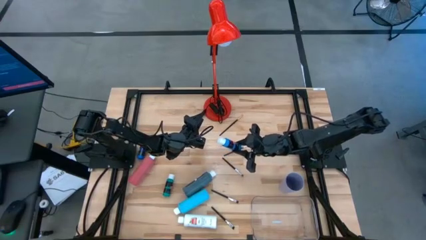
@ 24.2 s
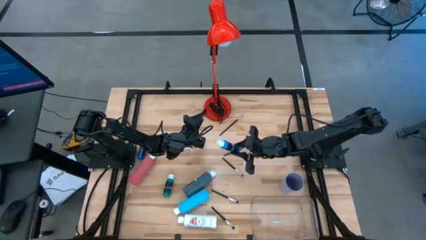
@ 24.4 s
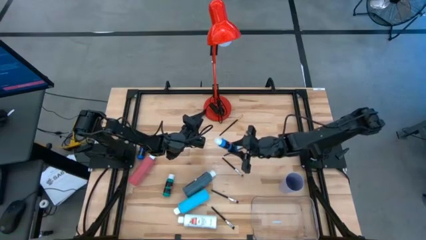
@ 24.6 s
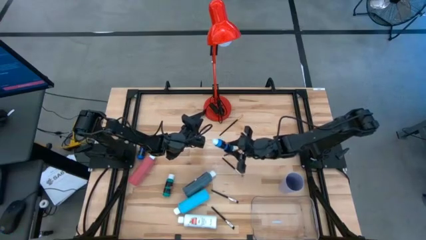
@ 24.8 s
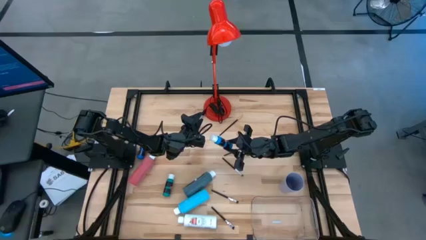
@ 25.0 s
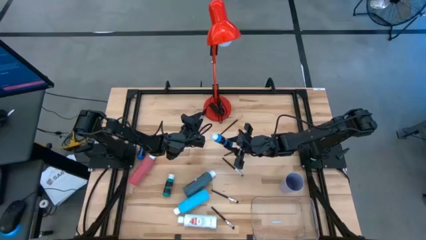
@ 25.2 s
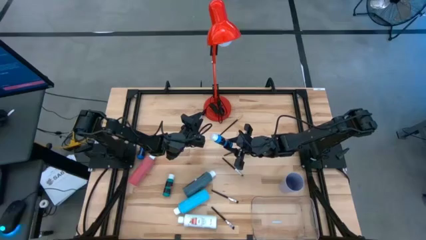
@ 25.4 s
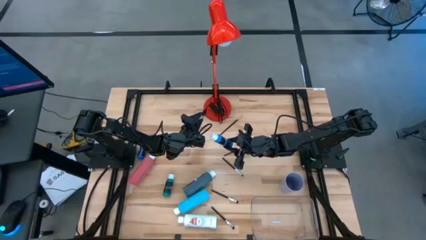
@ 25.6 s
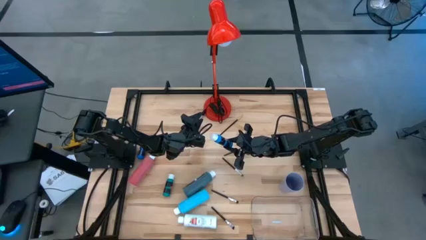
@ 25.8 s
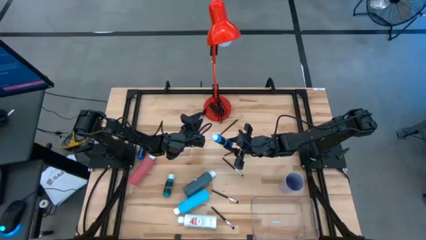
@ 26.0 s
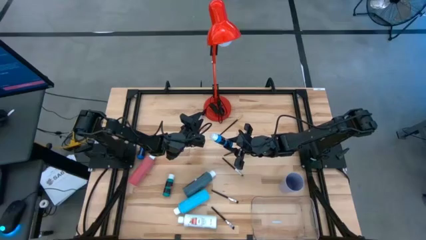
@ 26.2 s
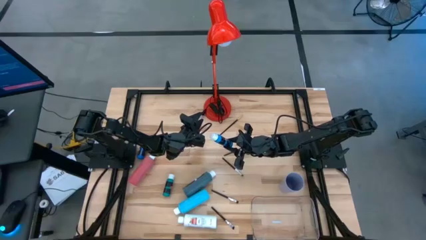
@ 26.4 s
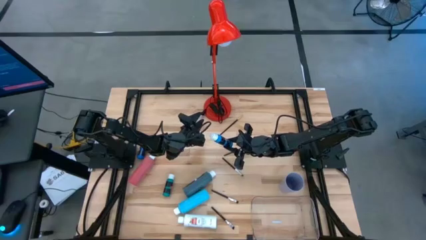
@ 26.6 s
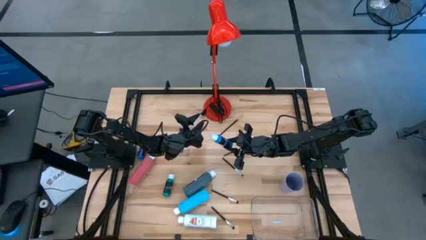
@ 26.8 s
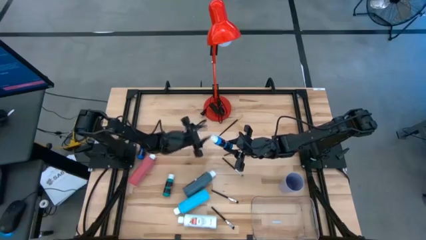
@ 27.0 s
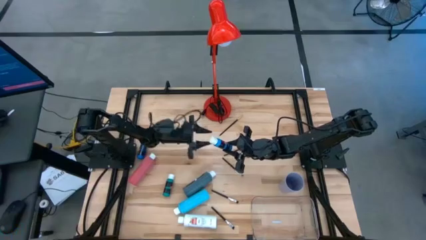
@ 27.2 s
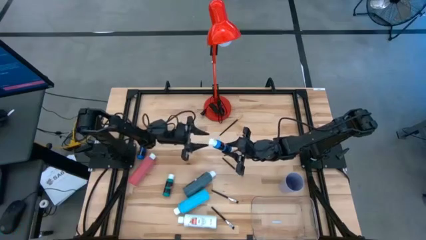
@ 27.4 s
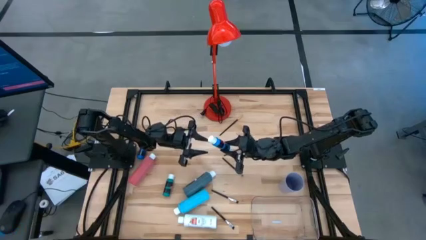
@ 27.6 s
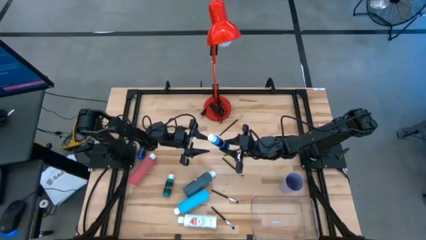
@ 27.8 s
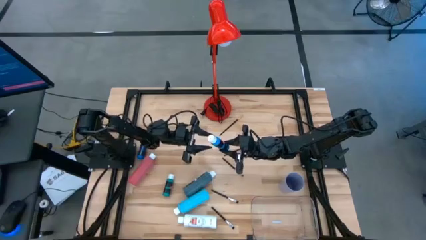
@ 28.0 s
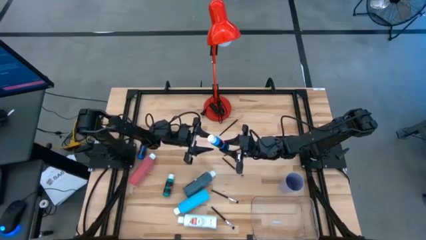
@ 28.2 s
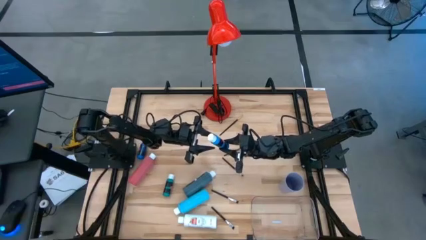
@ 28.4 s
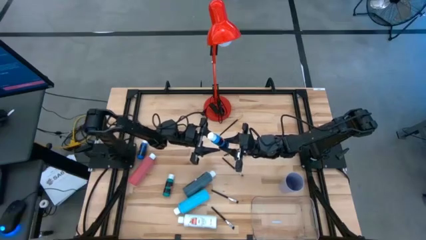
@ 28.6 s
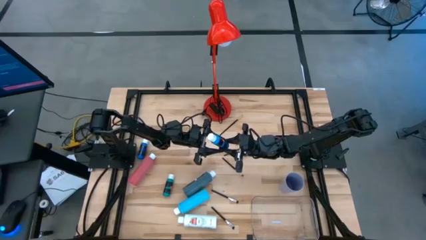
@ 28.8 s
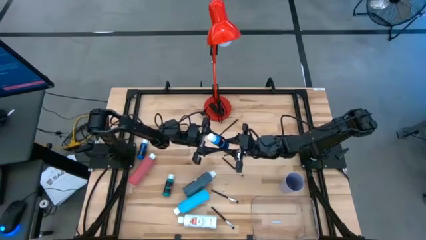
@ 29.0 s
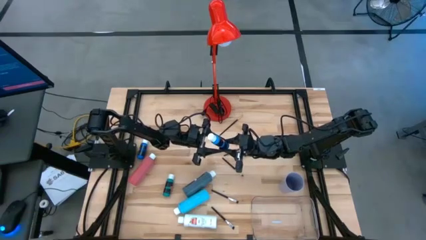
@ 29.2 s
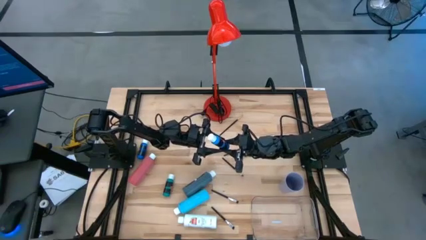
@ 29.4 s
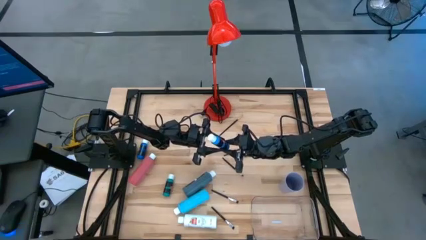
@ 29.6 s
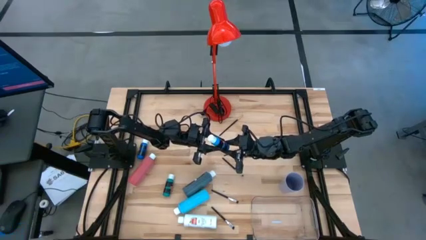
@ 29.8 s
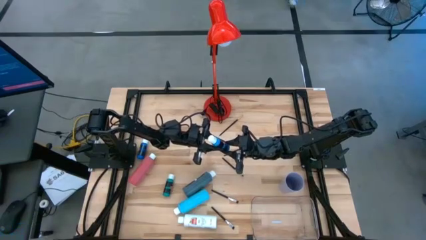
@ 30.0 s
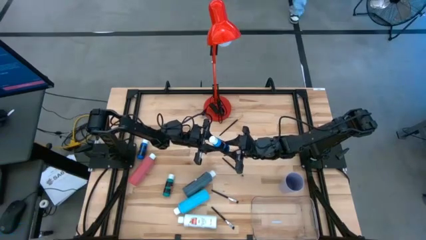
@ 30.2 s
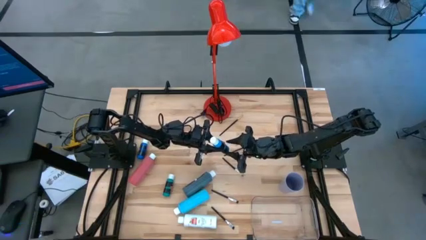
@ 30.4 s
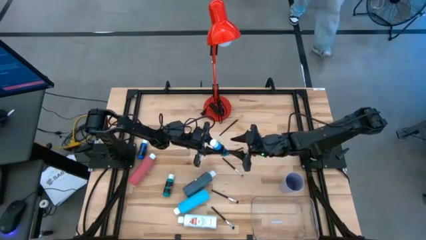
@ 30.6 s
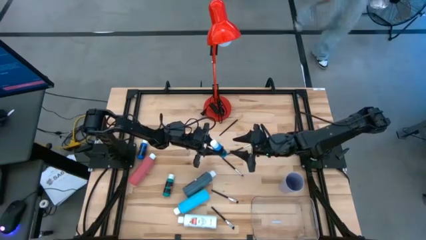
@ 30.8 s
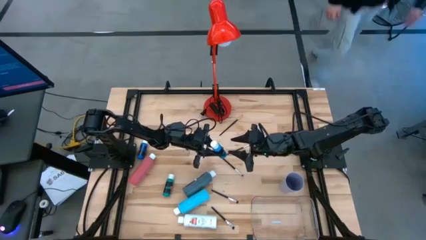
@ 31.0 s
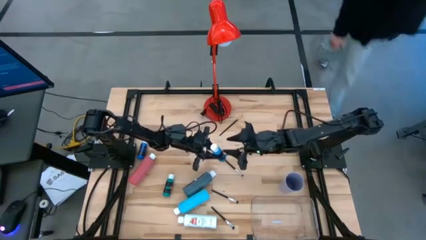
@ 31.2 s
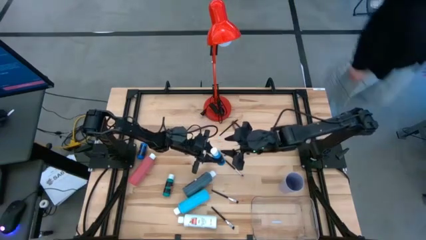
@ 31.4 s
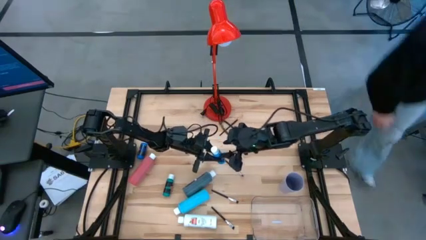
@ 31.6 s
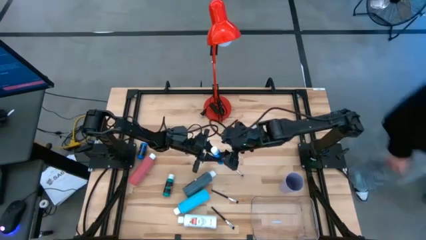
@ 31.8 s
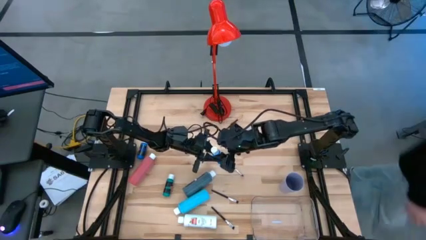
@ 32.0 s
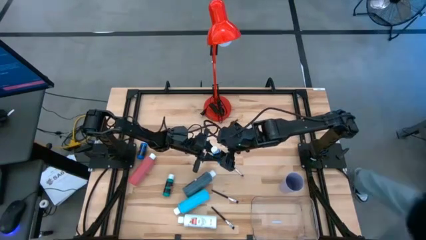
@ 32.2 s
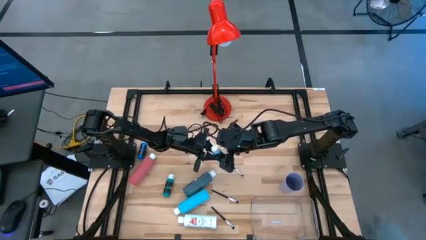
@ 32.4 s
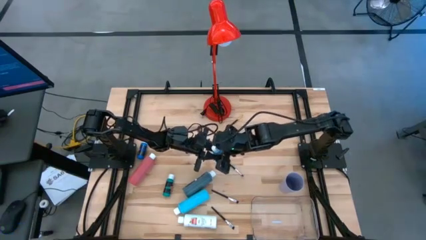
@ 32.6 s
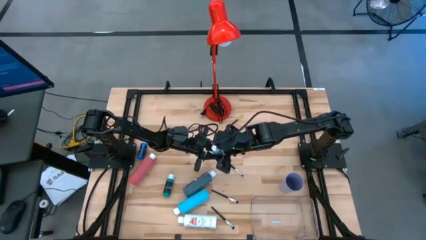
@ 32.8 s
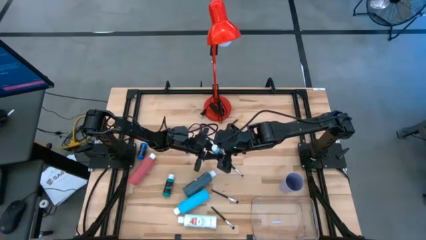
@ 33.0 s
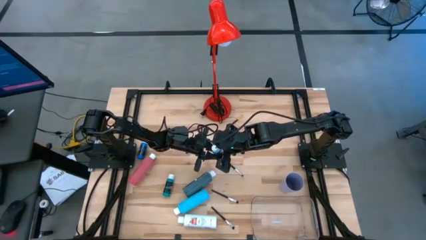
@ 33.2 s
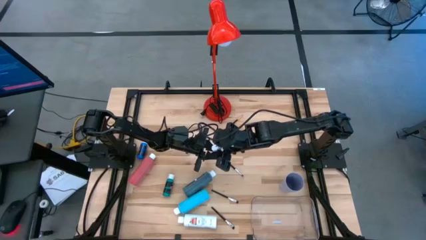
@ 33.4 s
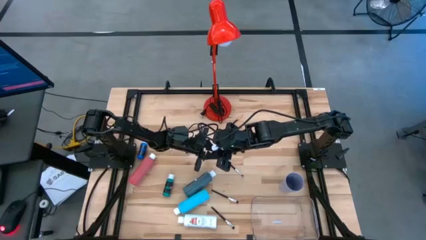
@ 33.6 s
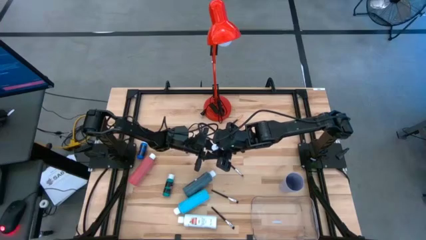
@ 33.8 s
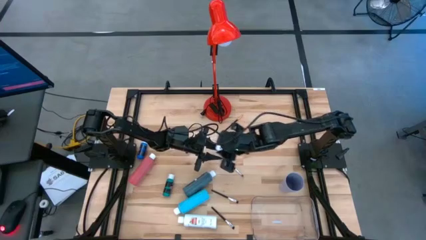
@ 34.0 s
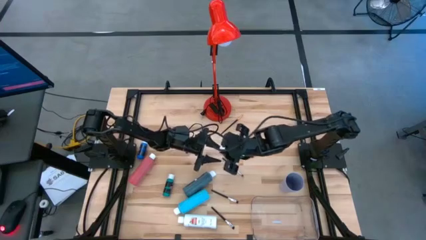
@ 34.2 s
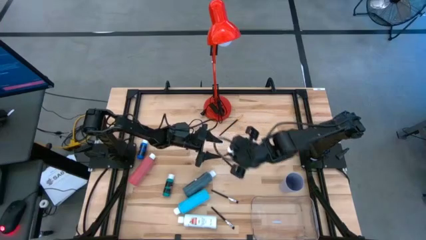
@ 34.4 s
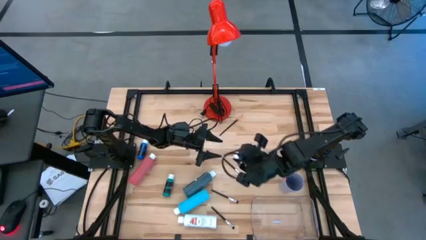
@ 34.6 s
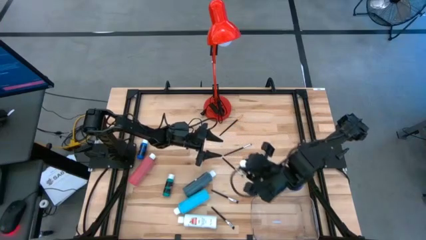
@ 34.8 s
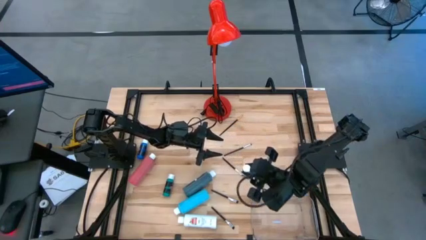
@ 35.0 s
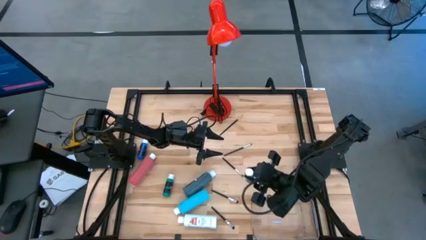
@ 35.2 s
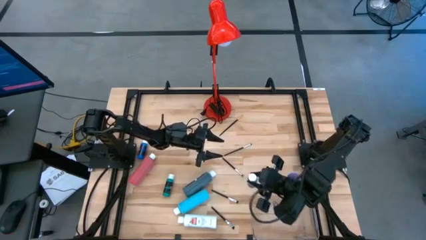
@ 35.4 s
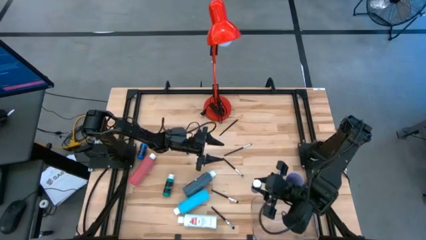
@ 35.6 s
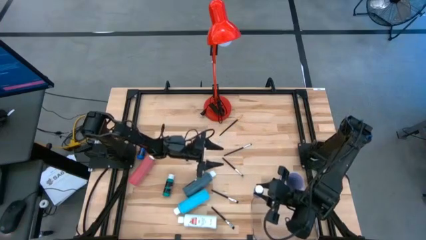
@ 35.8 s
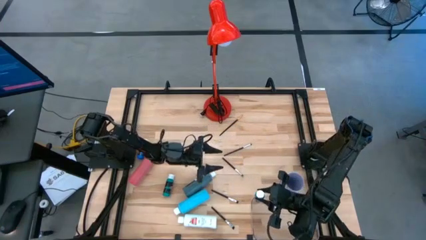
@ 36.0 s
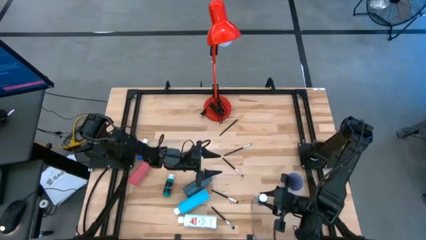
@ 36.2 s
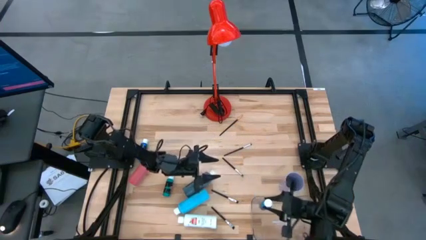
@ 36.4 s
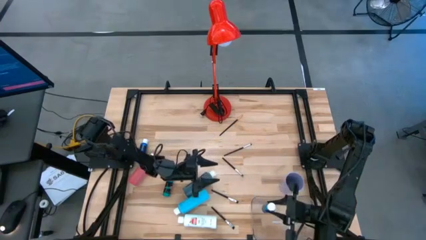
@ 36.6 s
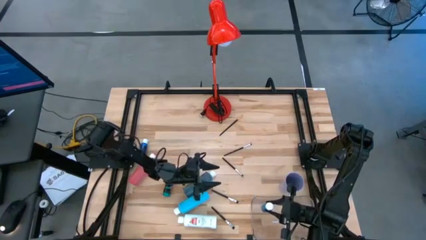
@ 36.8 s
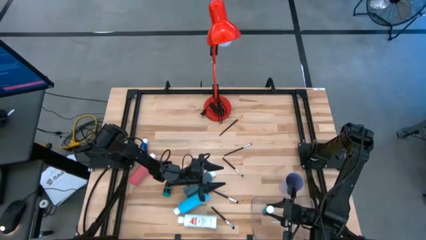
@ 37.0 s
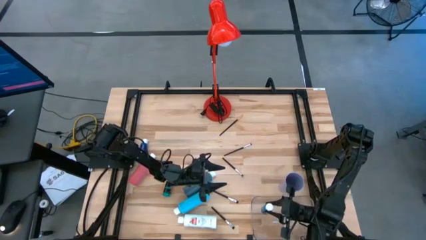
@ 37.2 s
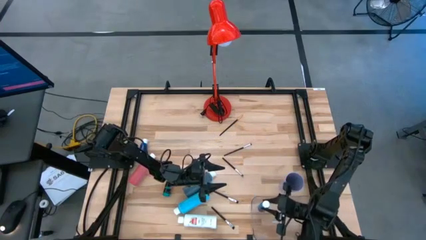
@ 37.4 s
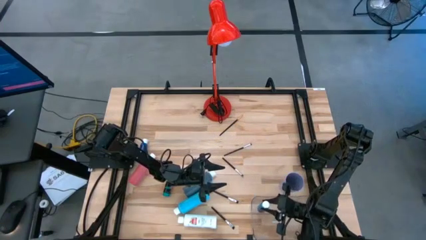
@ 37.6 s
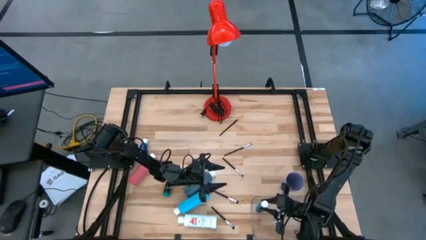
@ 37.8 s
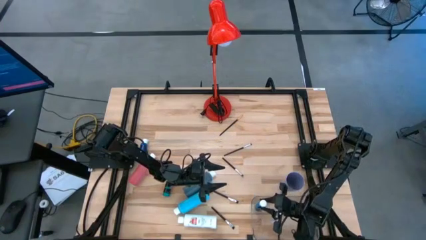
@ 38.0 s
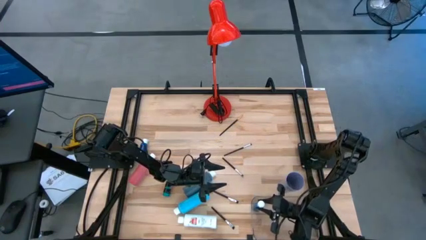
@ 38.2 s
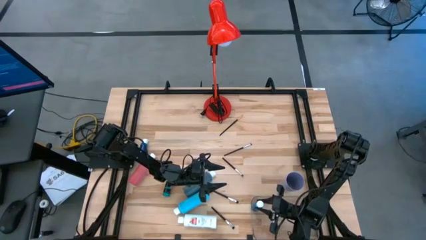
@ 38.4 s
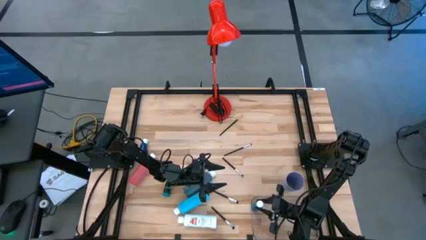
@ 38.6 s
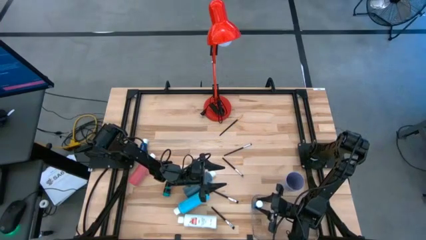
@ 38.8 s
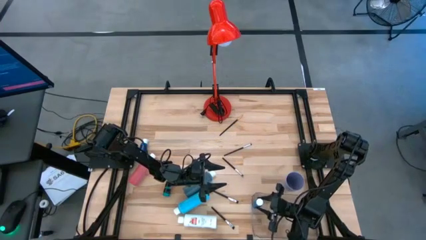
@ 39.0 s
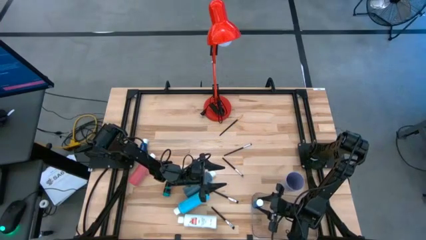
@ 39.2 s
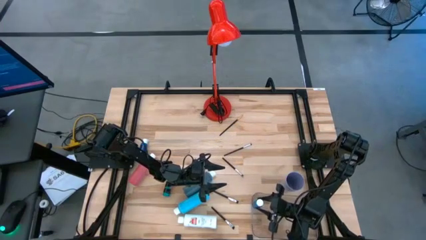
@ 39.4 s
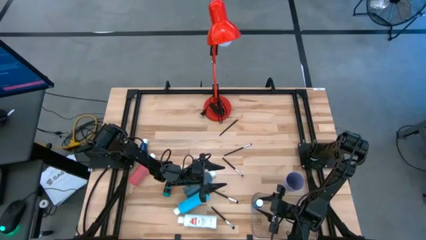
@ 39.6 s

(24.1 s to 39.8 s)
Task: Pick & Place Paint Supplies
Put the blue paint bottle into the transparent bin
